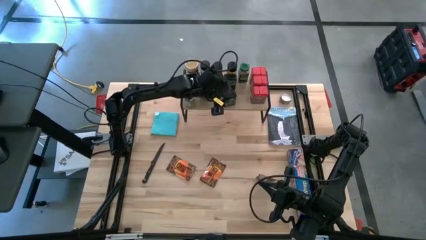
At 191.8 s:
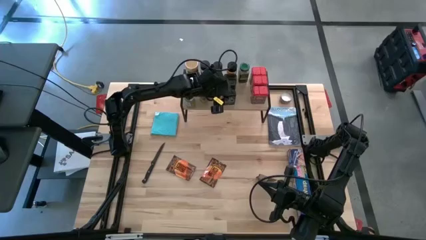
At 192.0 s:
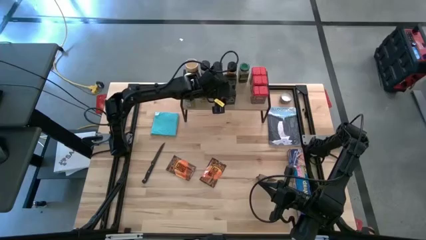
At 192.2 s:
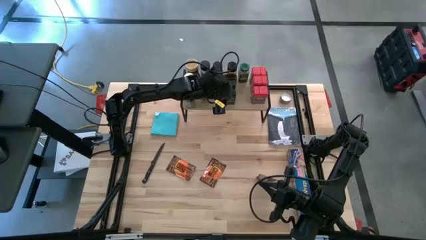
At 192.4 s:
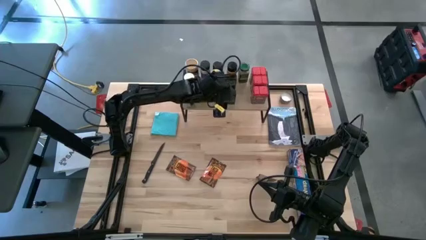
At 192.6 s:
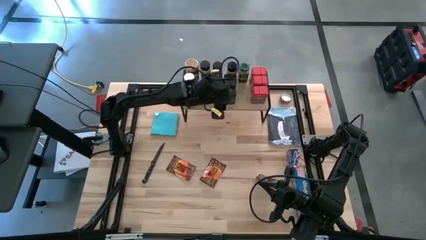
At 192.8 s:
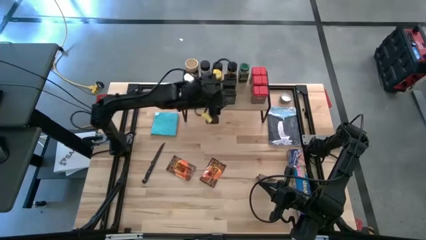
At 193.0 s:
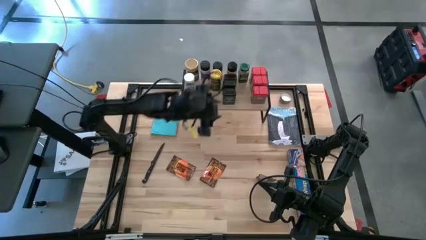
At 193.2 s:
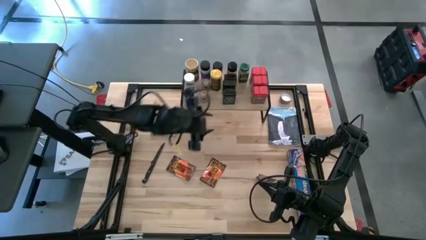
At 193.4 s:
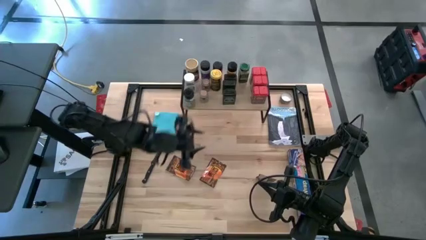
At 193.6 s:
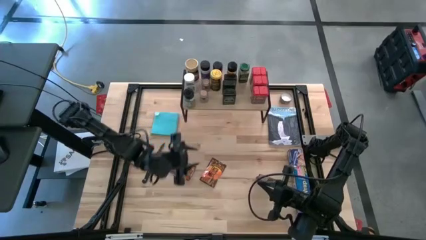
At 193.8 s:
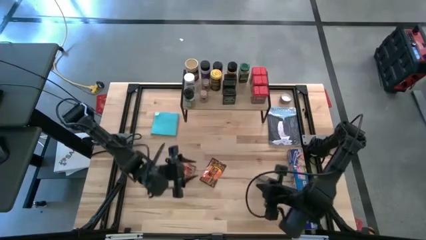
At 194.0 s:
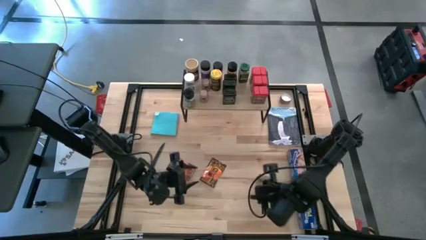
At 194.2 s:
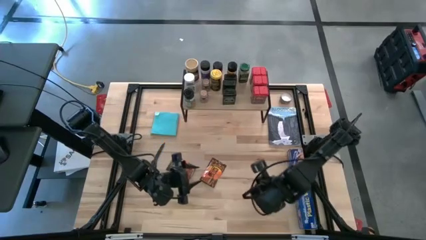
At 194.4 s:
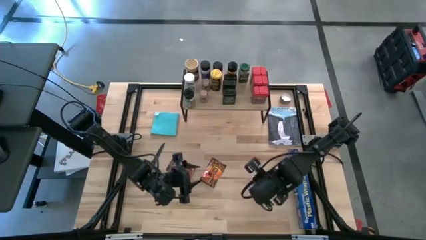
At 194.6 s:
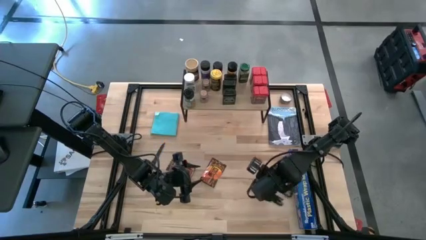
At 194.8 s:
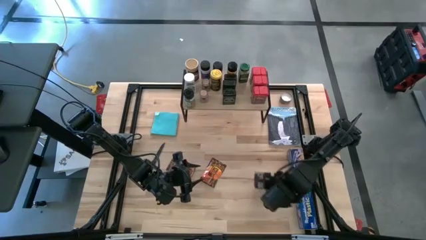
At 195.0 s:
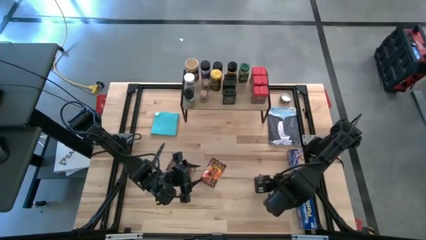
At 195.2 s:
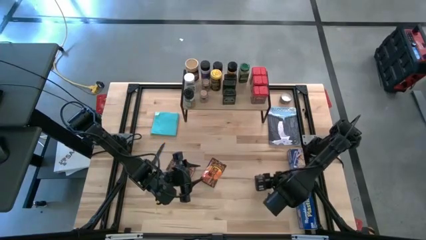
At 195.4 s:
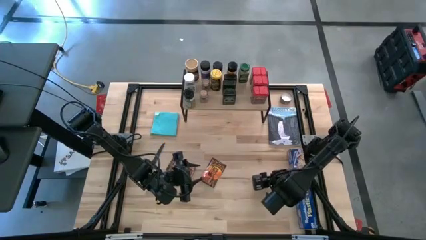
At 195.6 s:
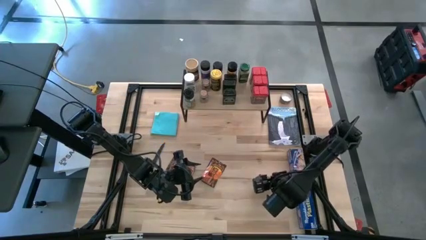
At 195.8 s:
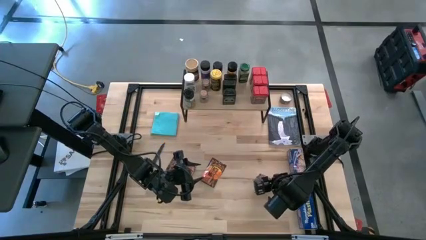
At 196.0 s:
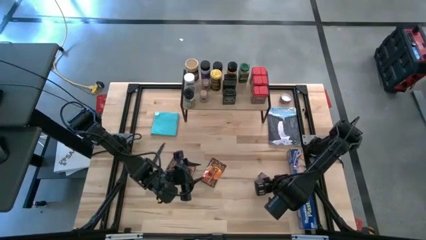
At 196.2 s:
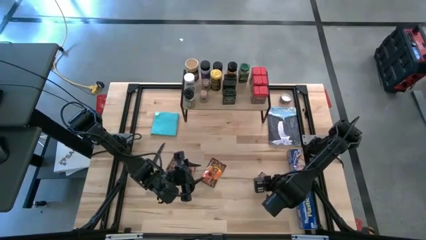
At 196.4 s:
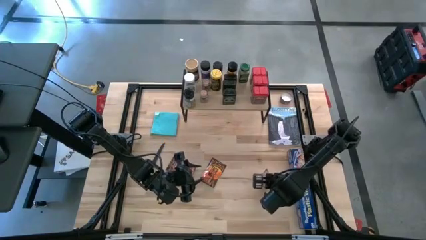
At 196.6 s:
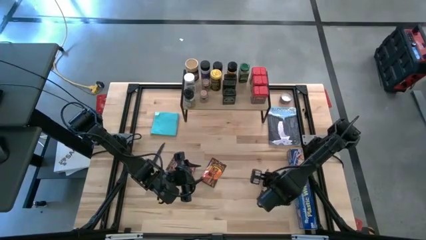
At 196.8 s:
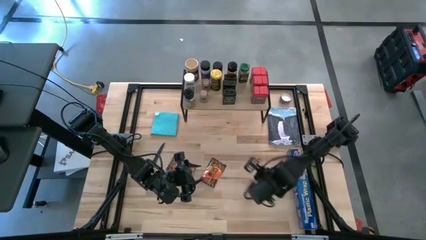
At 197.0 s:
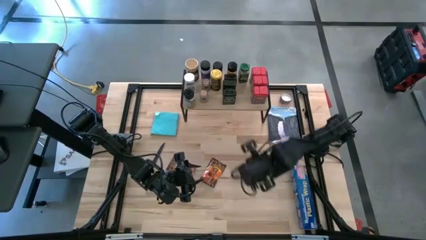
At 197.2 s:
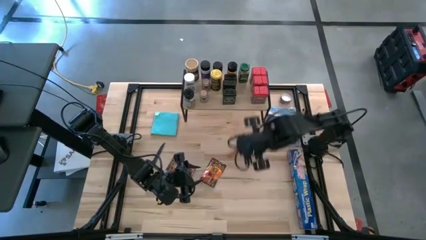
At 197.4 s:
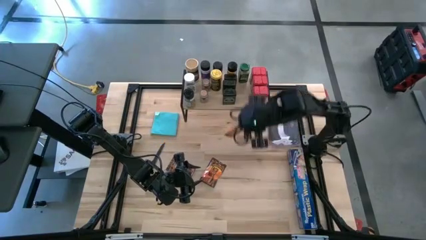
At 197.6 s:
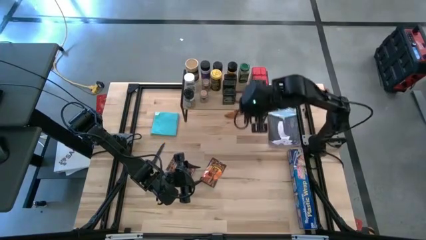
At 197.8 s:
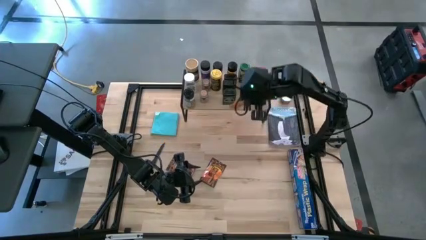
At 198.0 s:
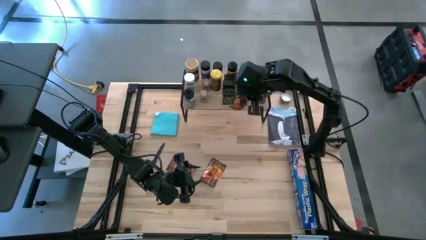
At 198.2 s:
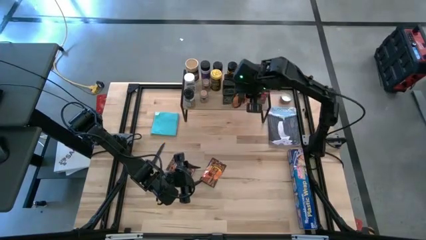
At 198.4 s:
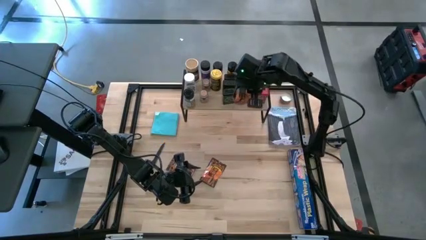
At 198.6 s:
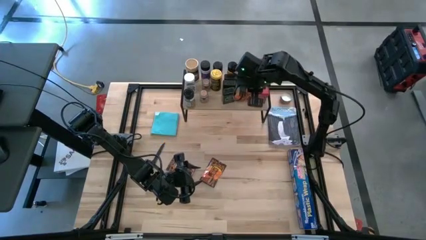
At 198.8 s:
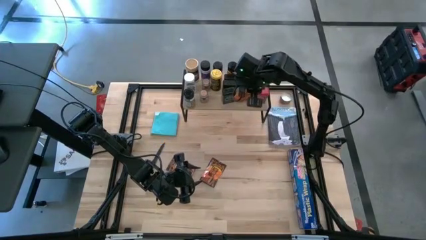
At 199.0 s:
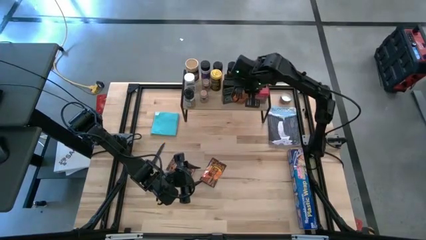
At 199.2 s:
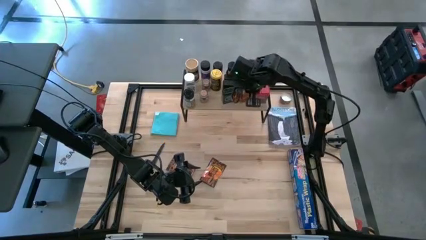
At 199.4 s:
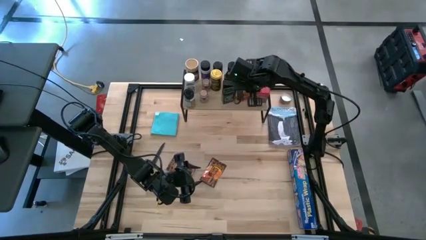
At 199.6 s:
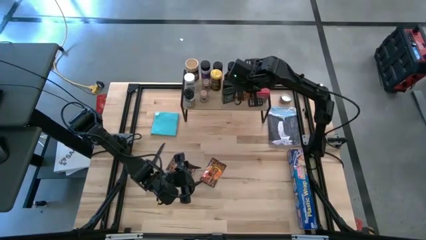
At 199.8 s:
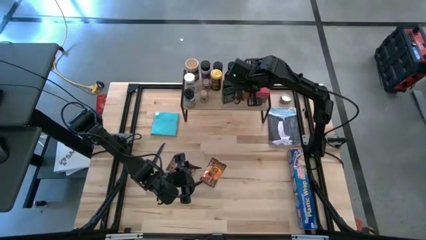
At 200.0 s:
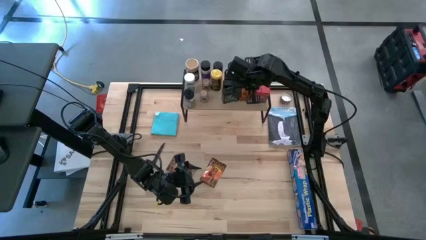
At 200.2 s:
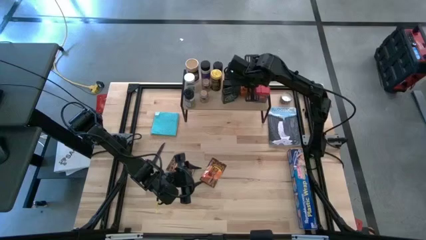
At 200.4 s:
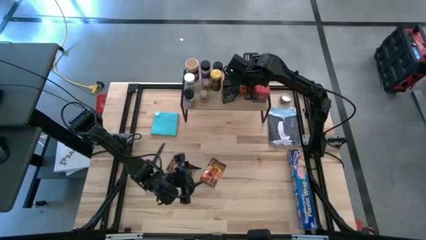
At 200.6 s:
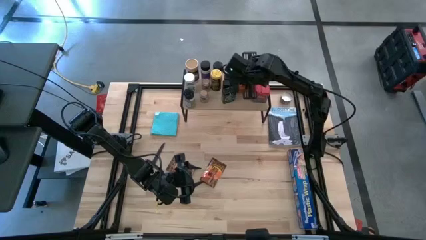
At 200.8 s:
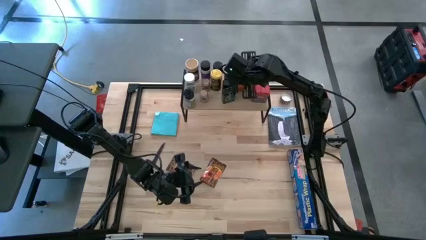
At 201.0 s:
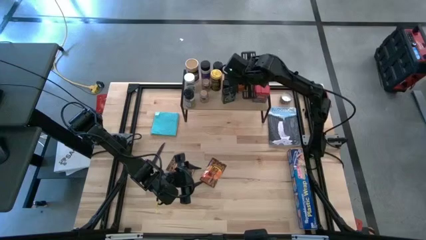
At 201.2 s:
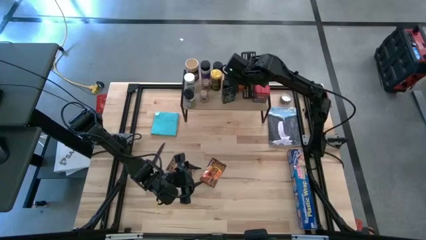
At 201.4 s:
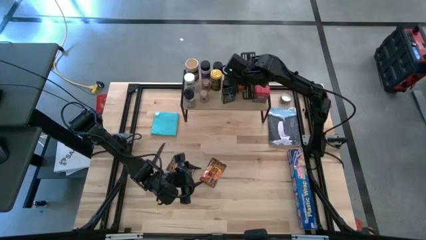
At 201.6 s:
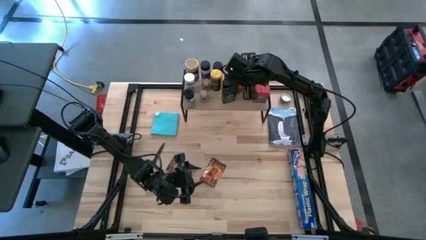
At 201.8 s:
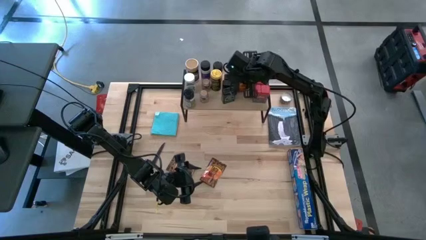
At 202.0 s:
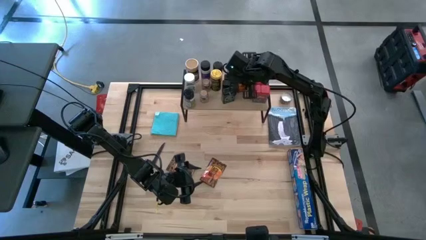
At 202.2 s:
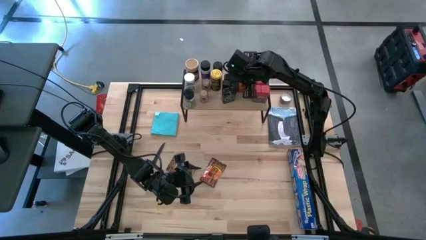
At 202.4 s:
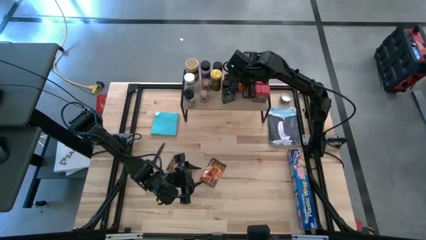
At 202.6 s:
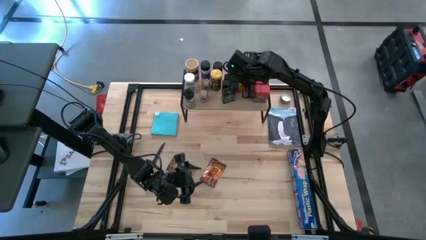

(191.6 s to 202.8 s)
Task: Shelf spices
Put the orange seasoning bag on the shelf

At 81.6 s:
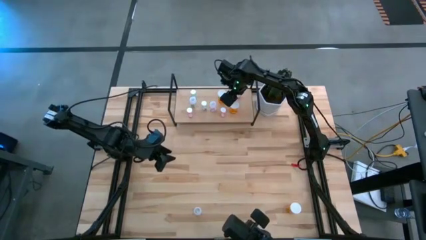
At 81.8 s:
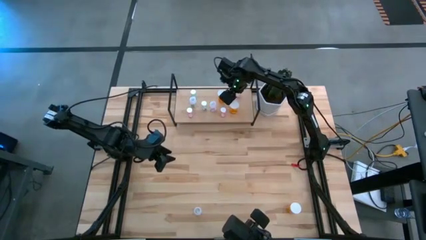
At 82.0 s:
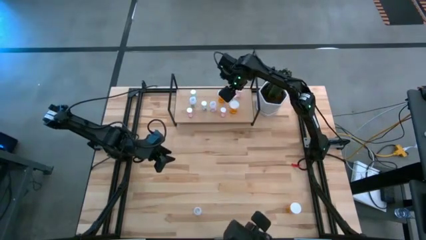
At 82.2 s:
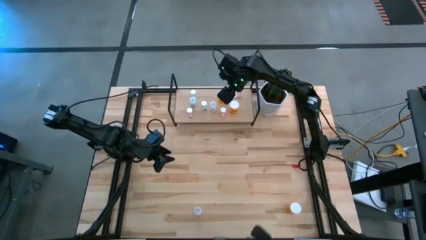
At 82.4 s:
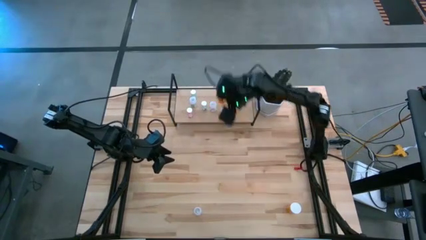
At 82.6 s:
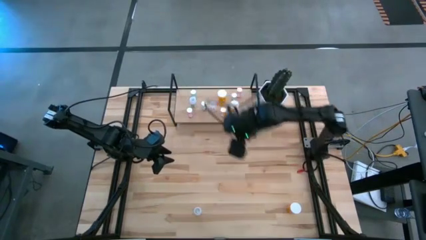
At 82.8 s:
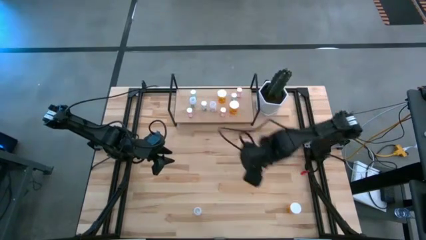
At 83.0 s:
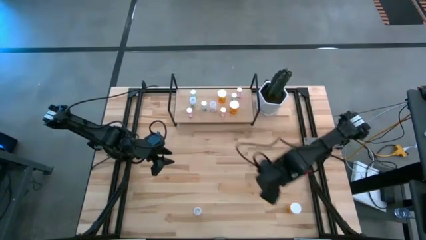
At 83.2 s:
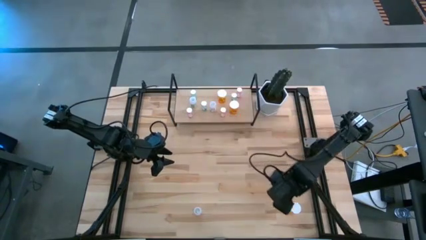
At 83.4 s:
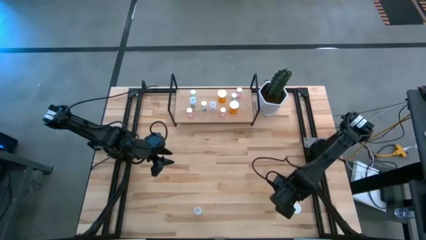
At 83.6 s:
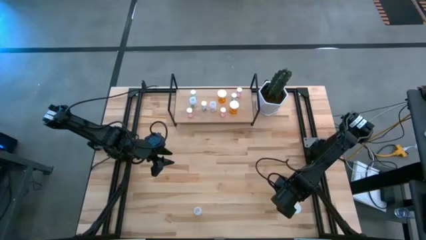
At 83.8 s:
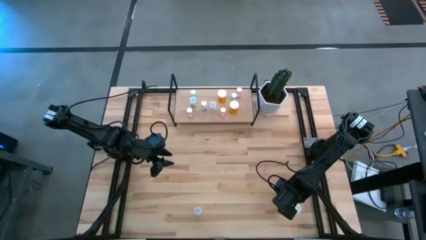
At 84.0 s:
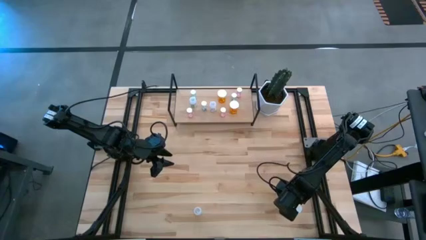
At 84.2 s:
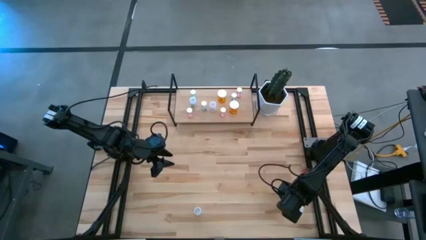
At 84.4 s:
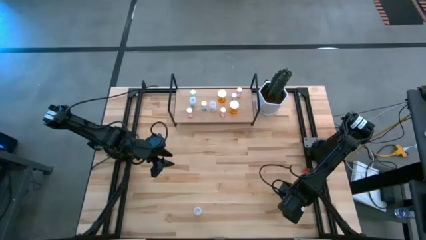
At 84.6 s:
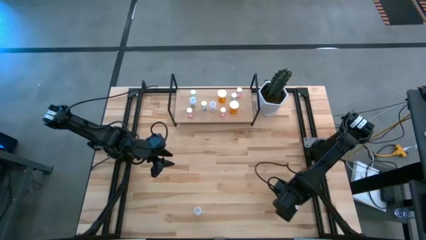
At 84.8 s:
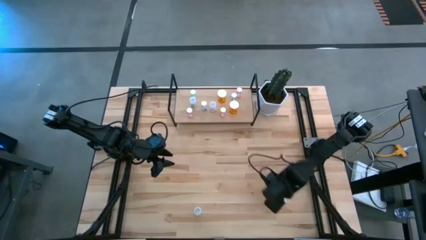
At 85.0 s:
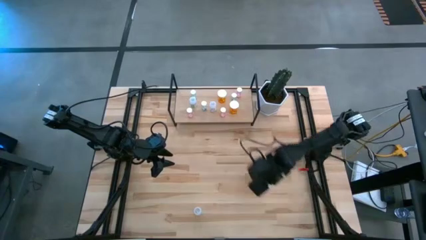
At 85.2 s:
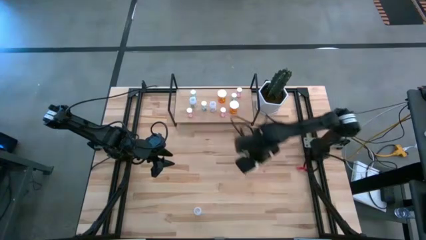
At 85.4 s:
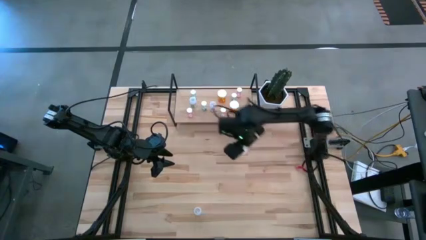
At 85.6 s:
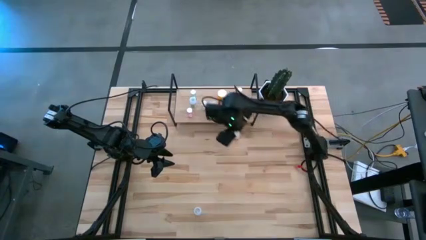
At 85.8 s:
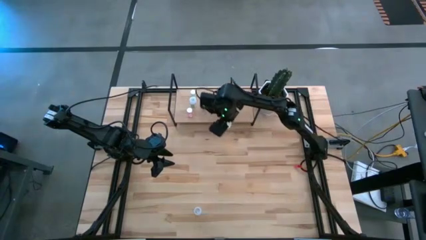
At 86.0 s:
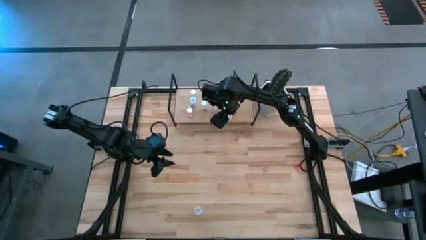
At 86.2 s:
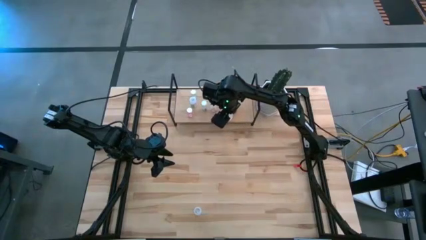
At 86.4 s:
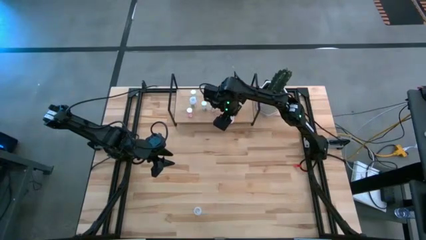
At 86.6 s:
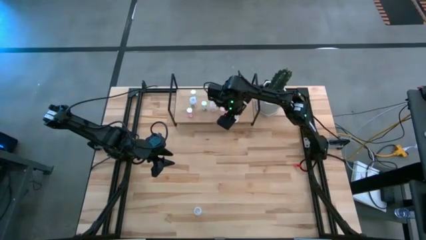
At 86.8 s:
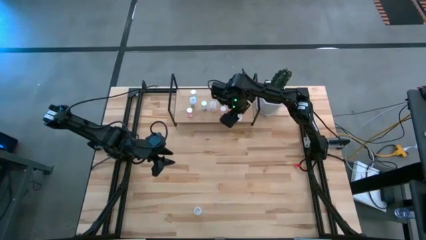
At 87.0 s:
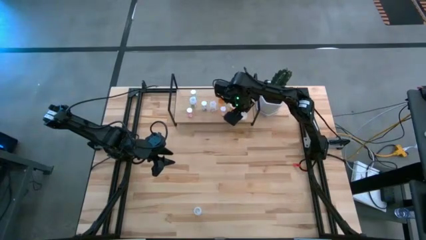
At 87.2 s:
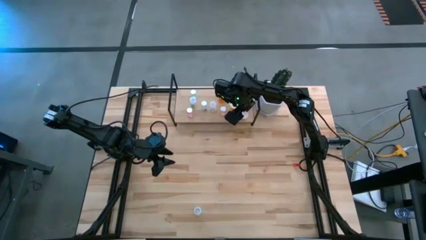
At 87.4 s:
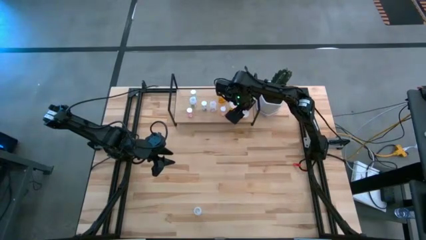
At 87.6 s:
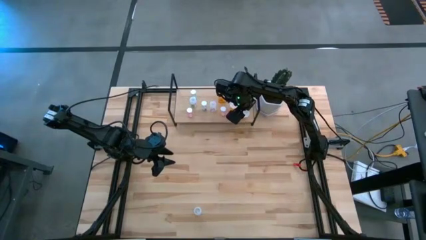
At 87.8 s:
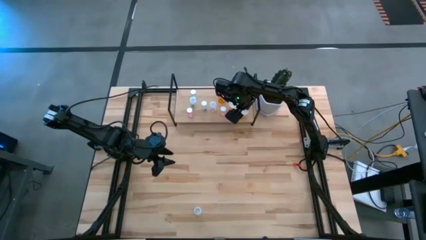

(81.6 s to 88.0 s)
Task: Pick and place medicine bottles onto shelf by color
Put the orange pill bottle on the shelf
